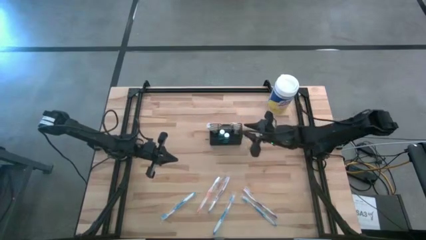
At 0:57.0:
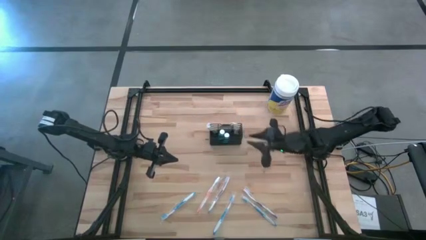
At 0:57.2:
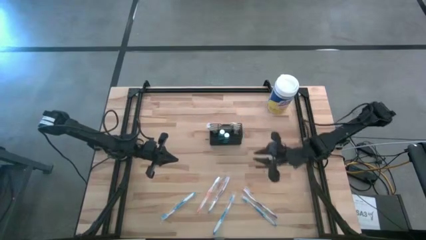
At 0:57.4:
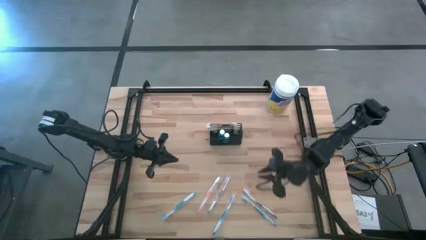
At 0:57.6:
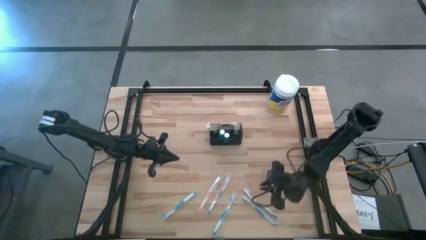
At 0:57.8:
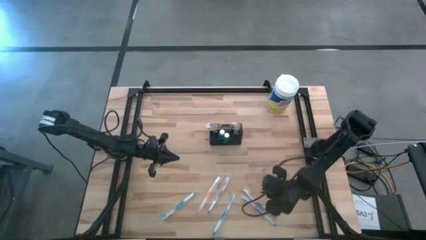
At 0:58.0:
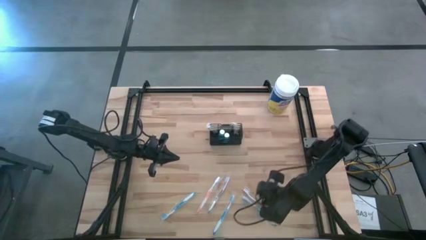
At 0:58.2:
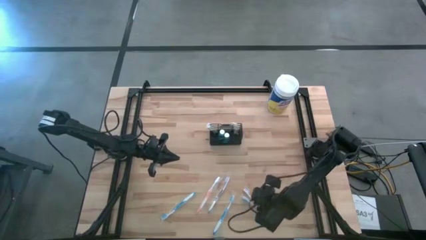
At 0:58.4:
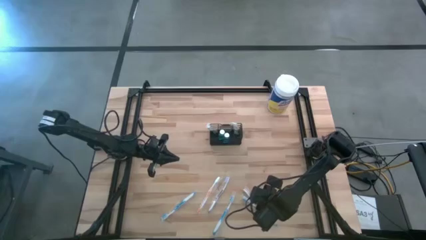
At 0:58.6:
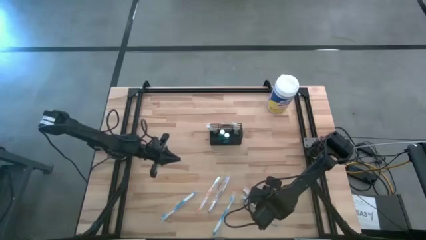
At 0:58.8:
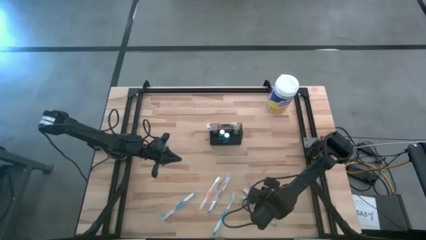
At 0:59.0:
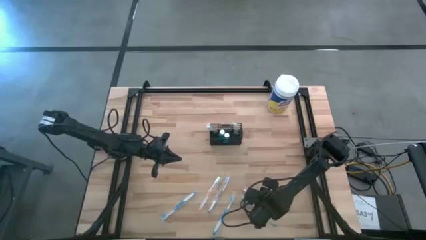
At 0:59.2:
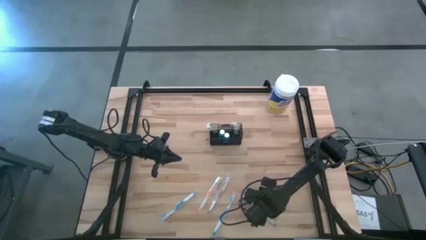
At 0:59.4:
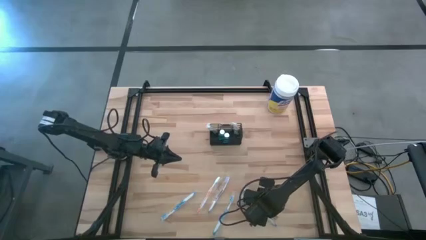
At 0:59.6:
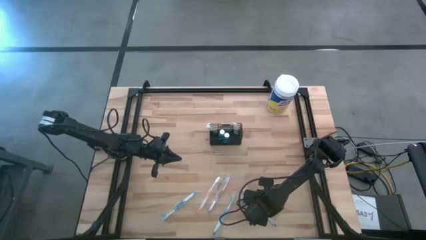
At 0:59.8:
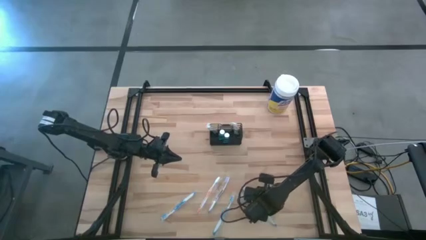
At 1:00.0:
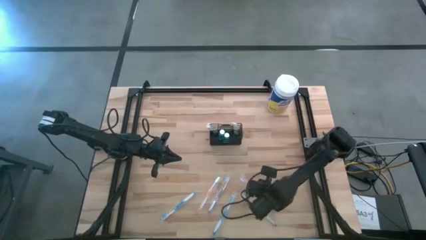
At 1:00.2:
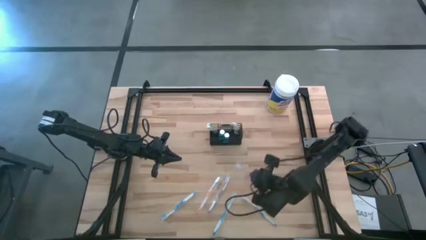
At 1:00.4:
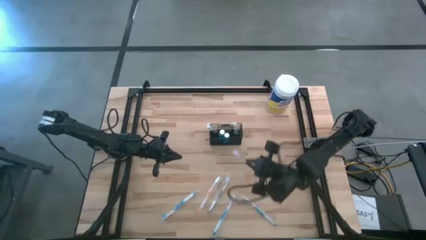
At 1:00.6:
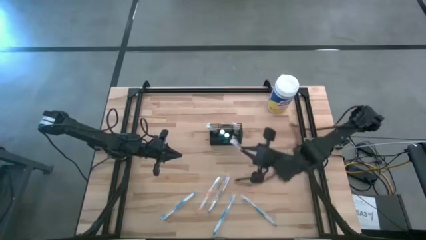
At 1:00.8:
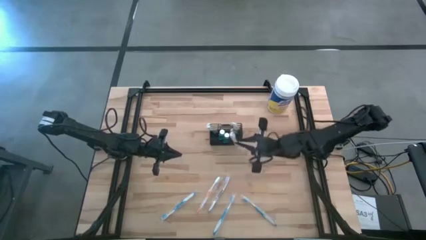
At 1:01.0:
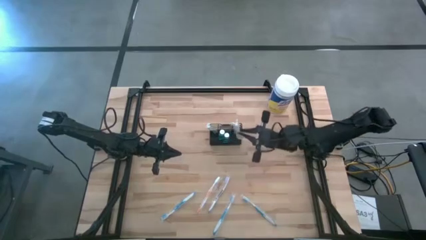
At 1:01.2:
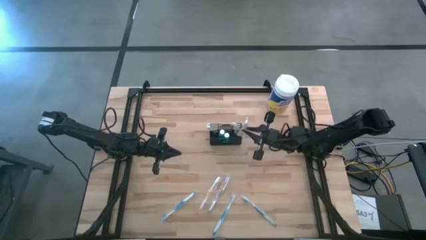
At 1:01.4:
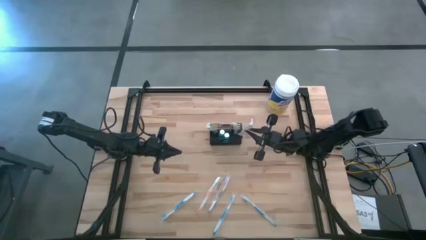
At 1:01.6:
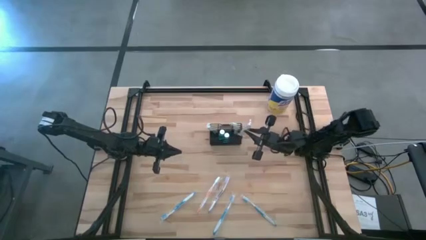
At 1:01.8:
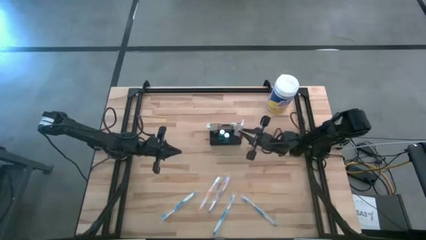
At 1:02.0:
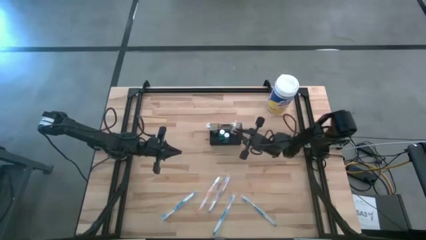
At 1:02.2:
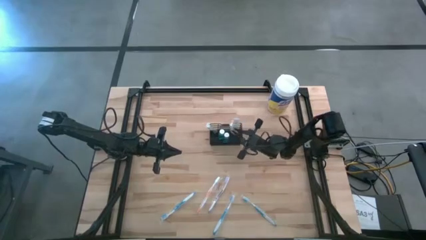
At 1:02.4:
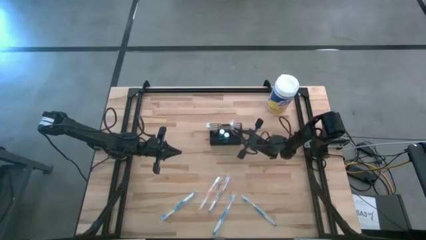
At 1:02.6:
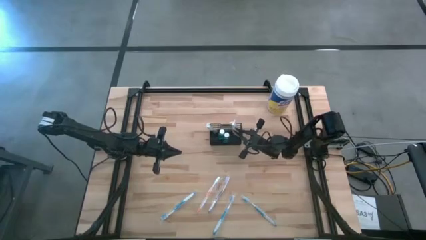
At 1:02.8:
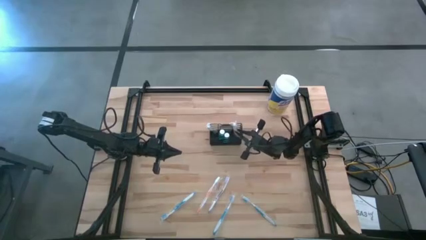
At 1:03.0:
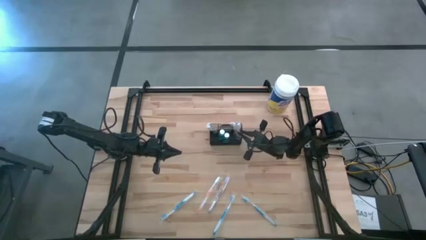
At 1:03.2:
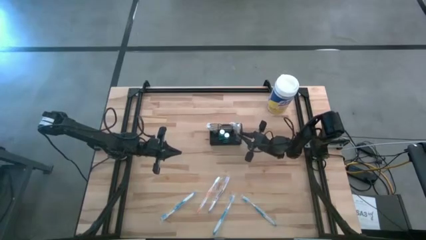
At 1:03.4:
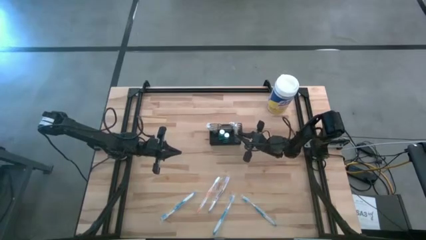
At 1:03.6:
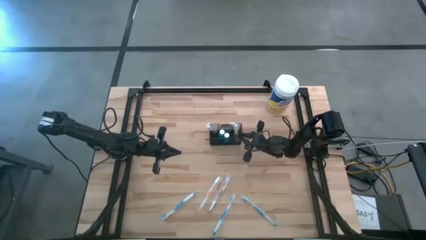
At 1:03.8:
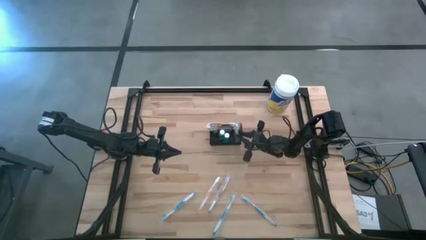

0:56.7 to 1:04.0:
Task: Pick & Place toothbrushing station
Put the right violet toothbrush into the black wire organizer

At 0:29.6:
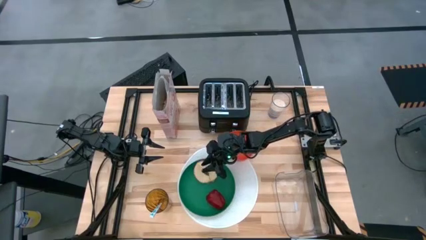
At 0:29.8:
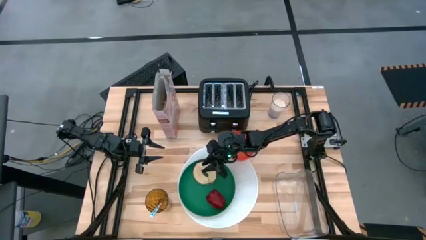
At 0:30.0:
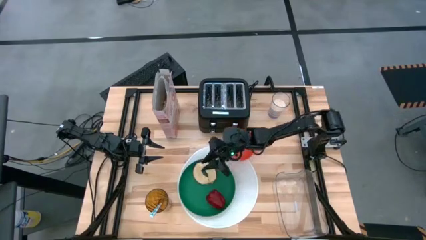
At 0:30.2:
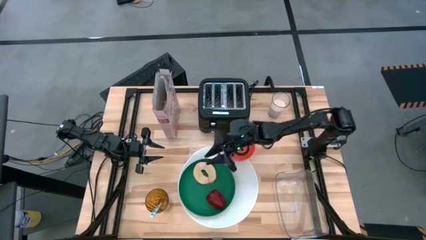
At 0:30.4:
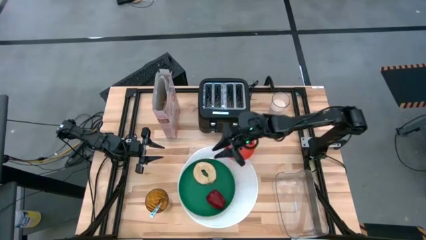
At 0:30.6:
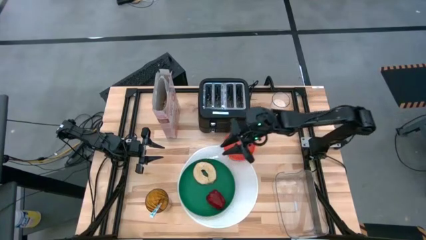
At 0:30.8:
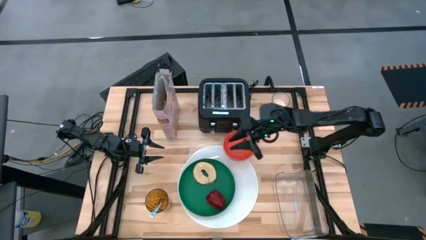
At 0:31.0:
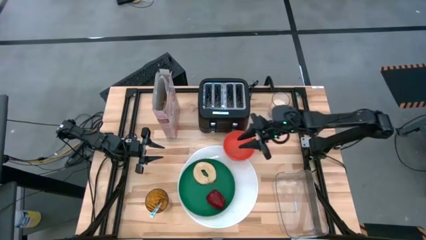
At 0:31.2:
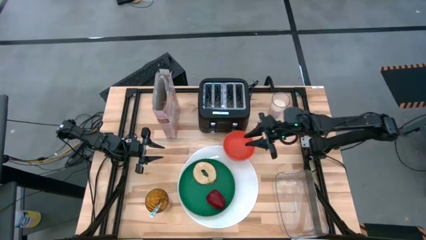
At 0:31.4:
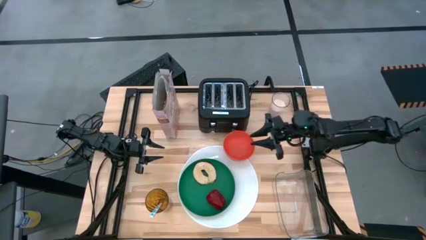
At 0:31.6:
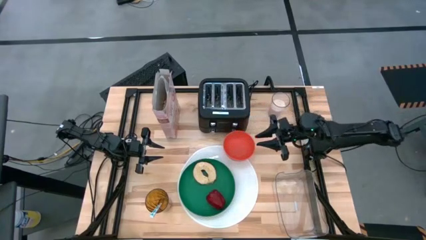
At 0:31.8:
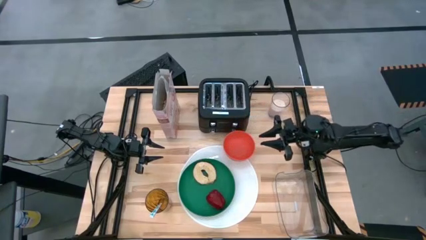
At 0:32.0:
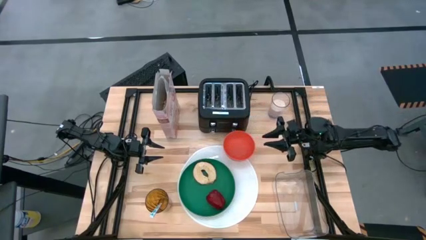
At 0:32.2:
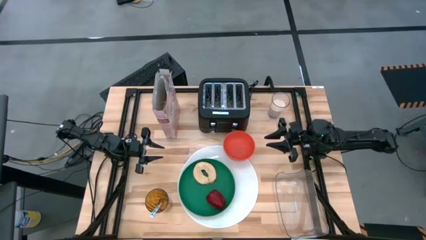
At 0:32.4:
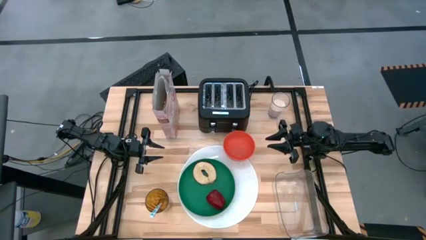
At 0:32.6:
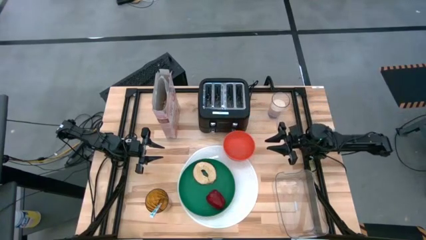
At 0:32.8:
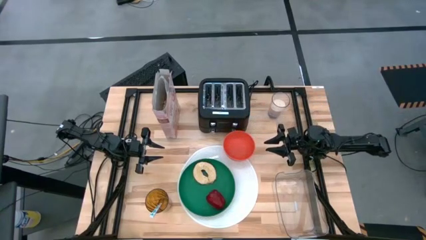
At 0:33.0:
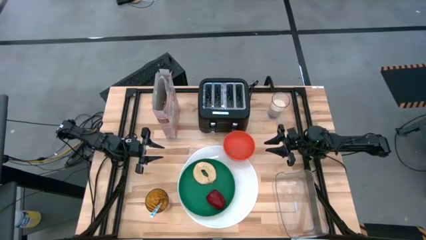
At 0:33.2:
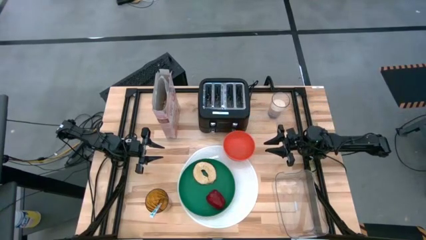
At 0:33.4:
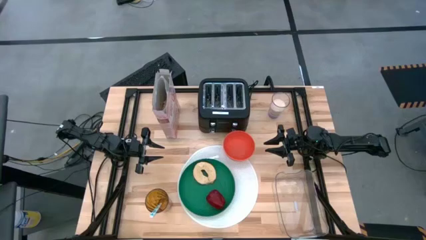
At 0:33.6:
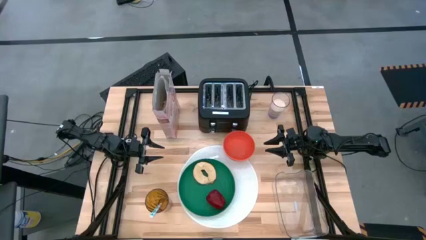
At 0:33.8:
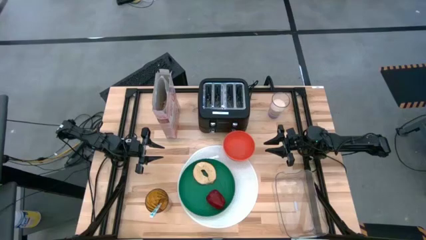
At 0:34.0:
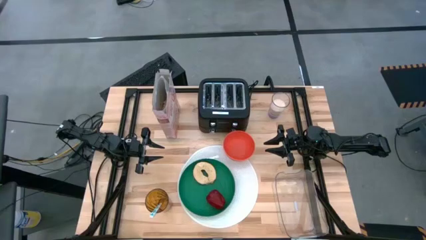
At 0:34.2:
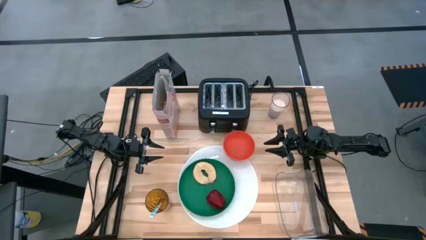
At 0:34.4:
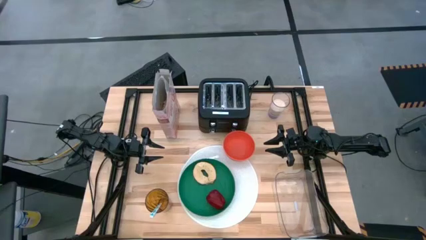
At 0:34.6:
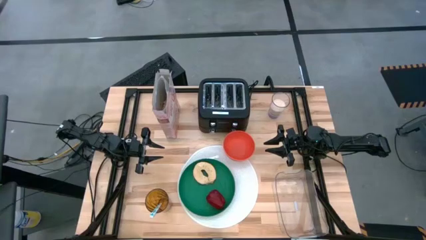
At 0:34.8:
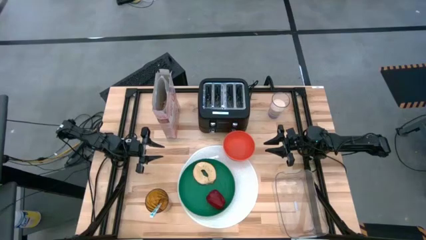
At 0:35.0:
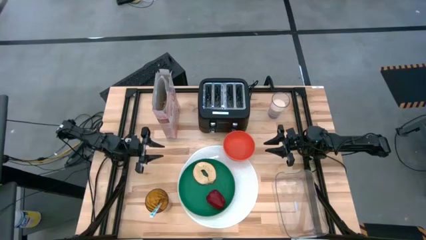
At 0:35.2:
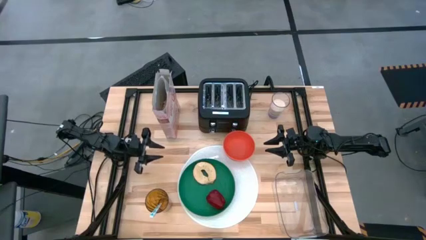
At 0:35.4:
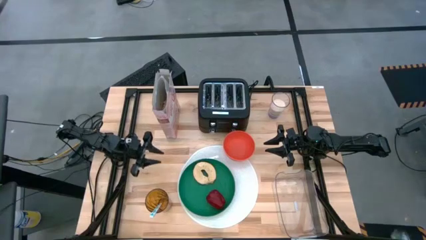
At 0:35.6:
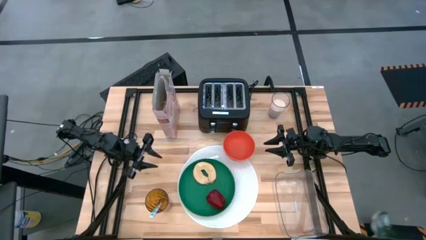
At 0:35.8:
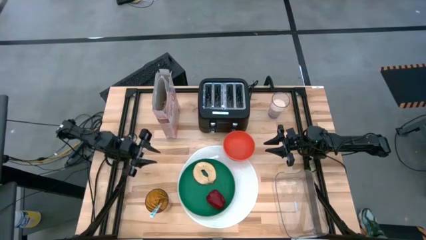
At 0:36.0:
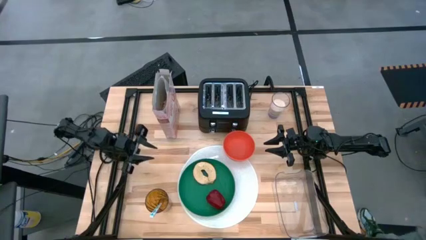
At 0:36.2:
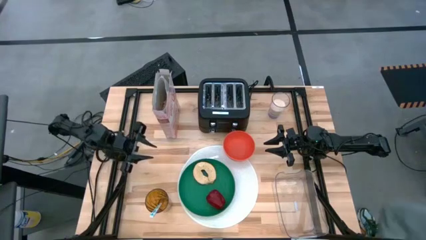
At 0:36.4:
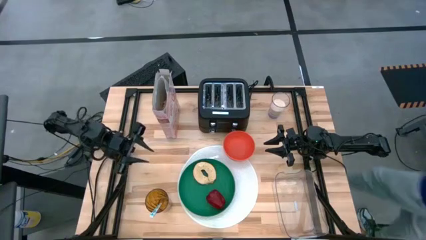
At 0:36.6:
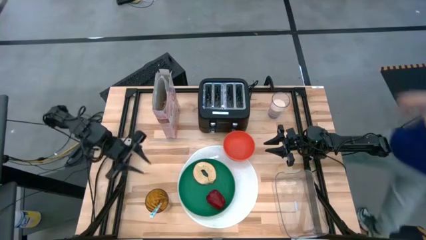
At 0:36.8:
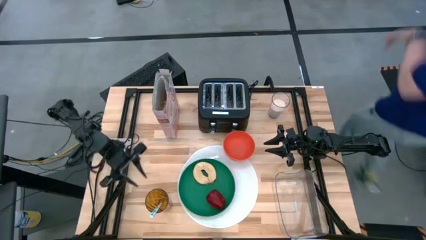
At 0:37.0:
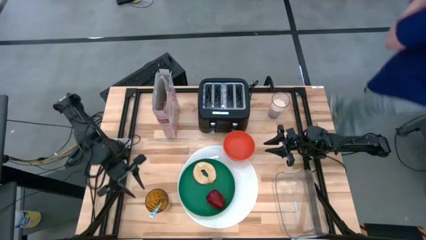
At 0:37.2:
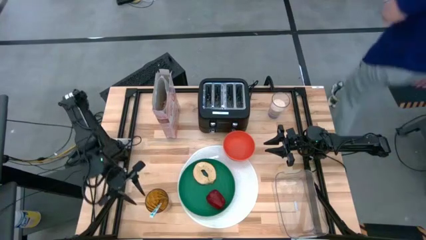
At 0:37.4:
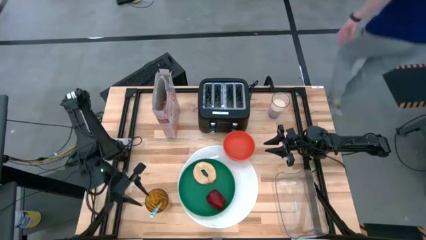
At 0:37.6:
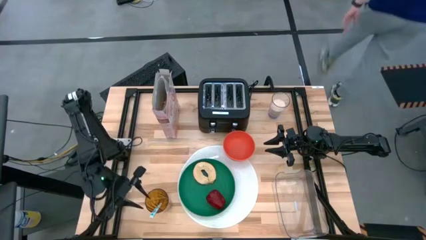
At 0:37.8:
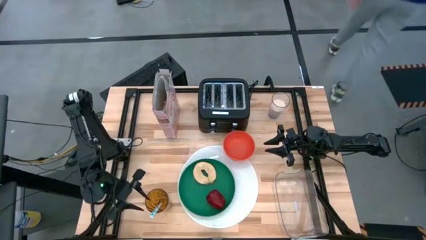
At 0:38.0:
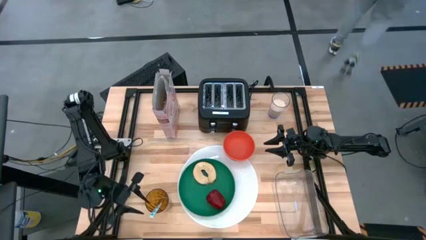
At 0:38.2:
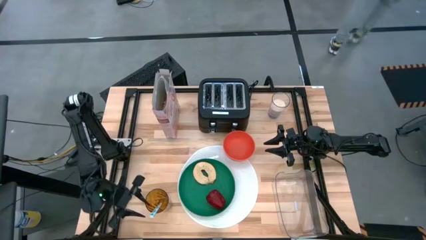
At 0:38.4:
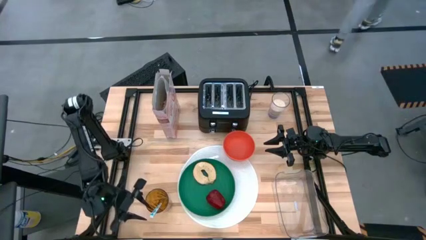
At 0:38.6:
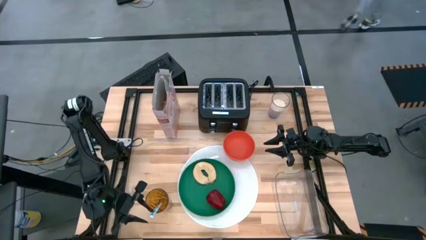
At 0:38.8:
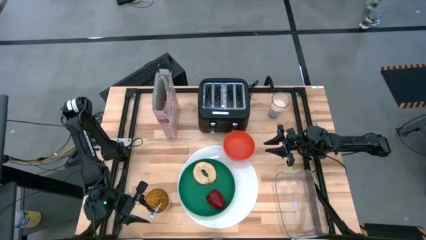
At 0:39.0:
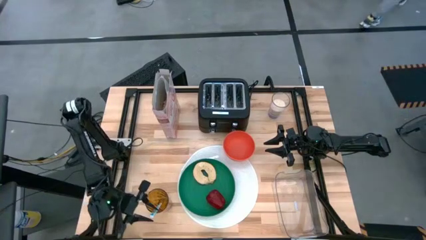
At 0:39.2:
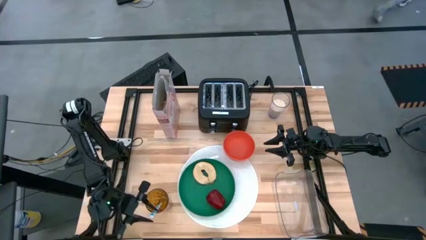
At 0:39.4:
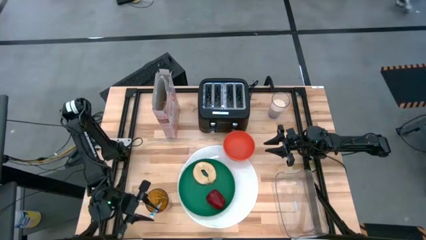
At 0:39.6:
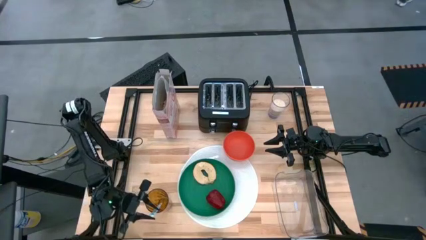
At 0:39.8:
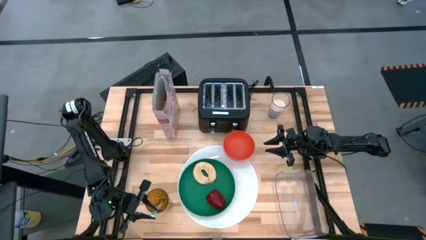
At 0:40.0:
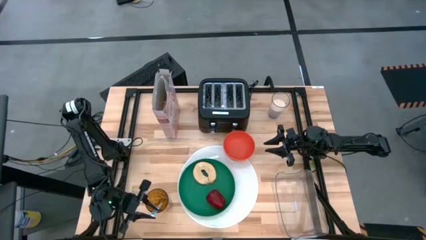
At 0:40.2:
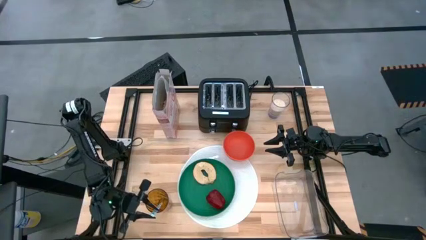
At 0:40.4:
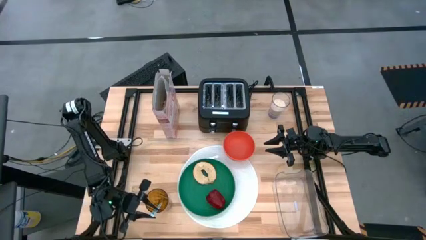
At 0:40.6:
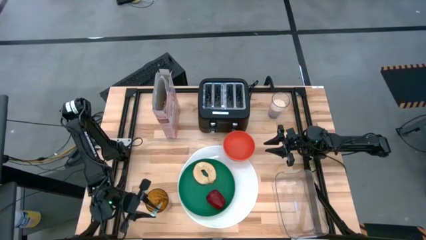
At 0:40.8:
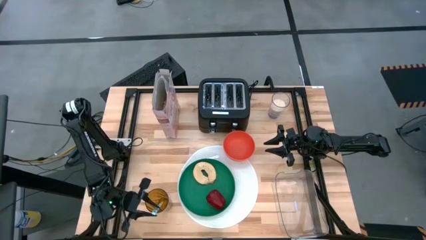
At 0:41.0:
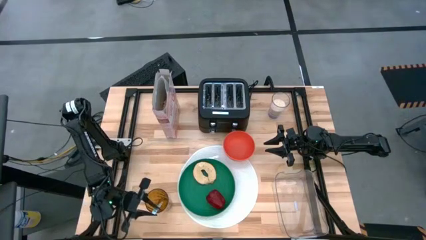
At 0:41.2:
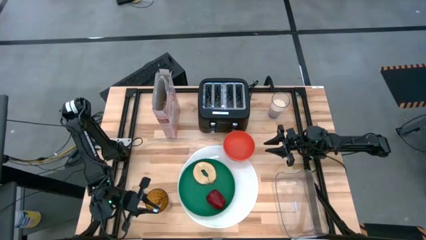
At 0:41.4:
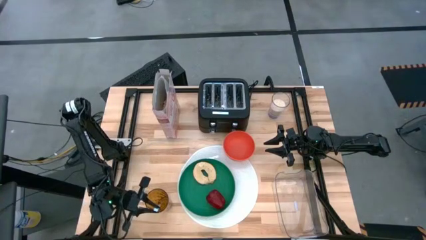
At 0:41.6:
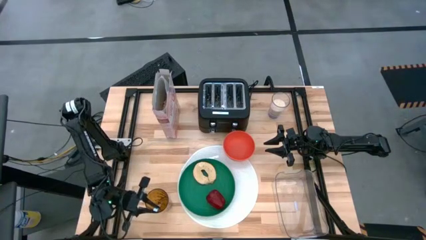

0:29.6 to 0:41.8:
Task: Arrange a breakfast setting
Put the blue spoon on the white mat from the orange cup
